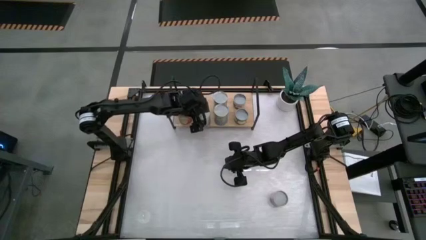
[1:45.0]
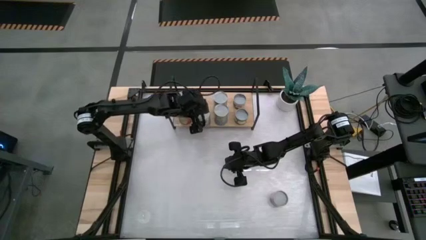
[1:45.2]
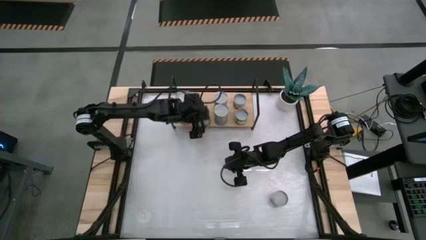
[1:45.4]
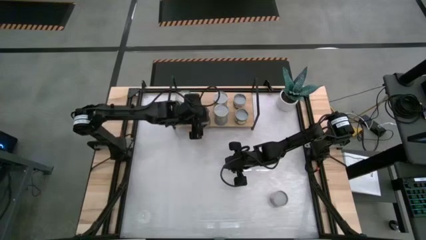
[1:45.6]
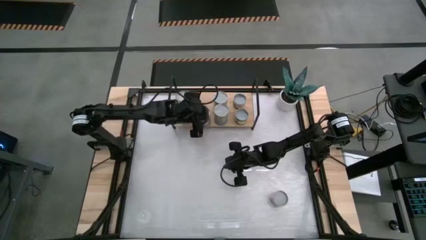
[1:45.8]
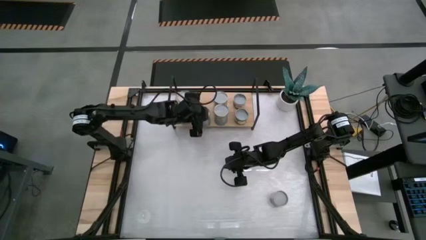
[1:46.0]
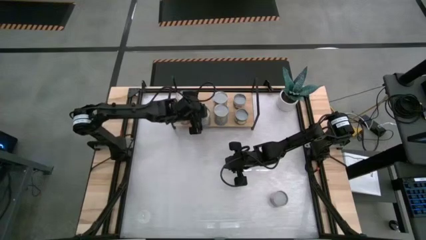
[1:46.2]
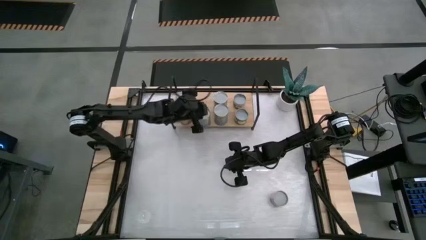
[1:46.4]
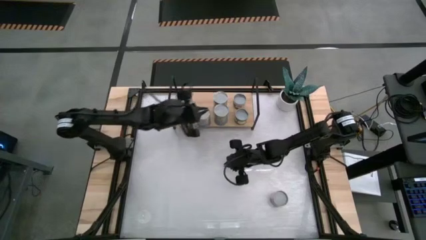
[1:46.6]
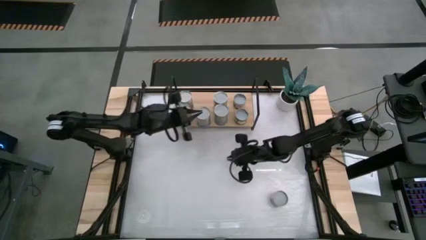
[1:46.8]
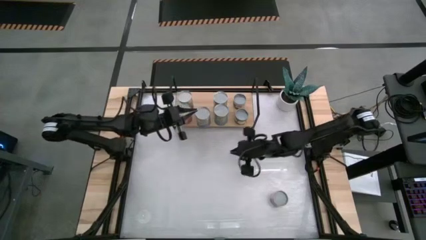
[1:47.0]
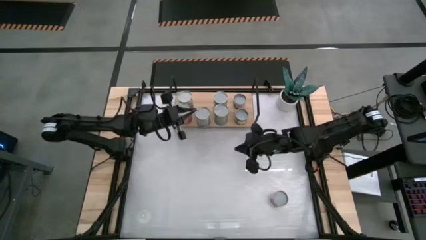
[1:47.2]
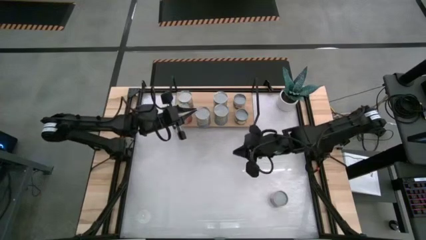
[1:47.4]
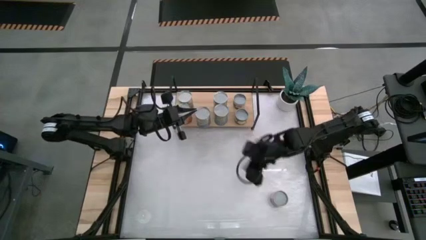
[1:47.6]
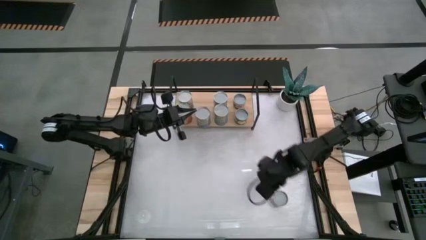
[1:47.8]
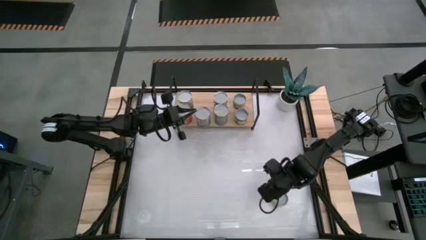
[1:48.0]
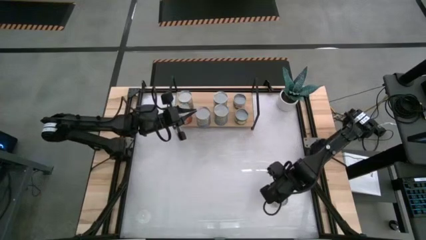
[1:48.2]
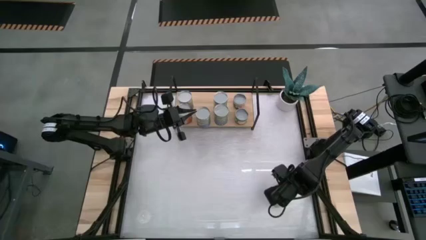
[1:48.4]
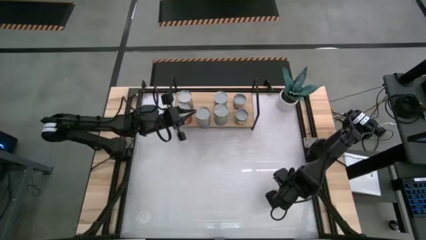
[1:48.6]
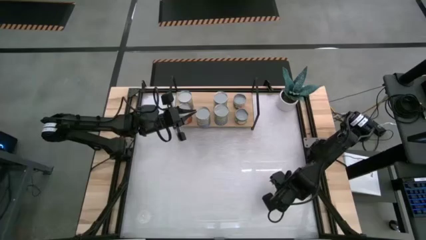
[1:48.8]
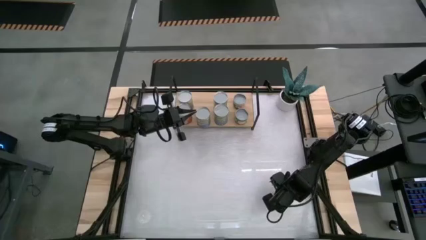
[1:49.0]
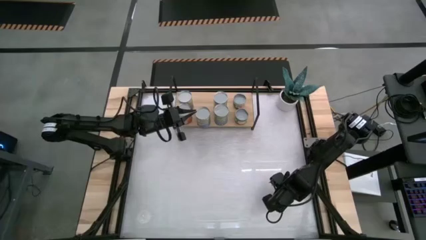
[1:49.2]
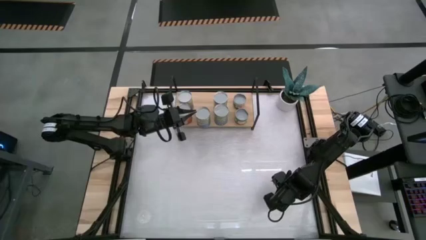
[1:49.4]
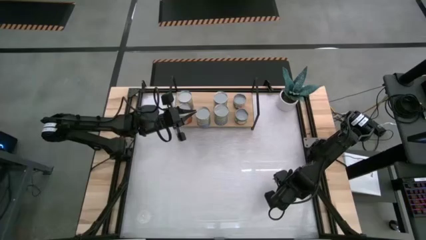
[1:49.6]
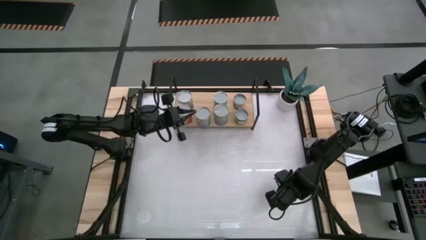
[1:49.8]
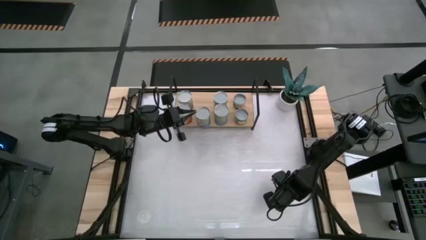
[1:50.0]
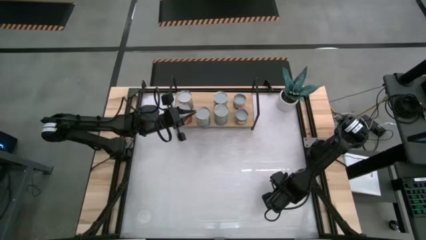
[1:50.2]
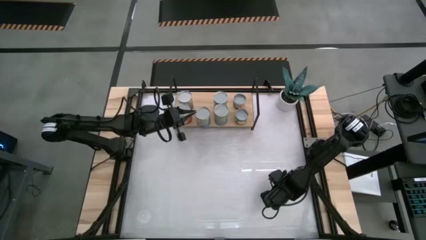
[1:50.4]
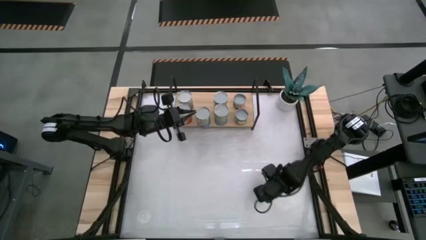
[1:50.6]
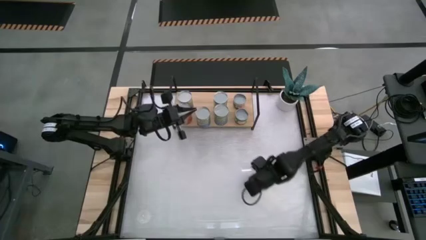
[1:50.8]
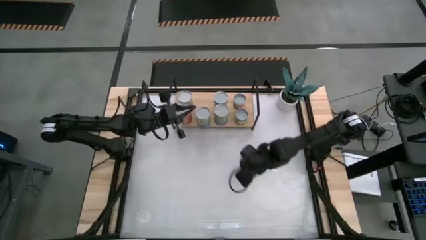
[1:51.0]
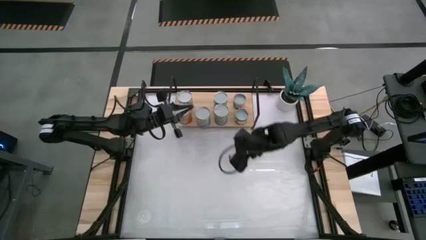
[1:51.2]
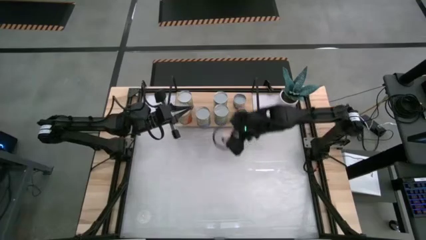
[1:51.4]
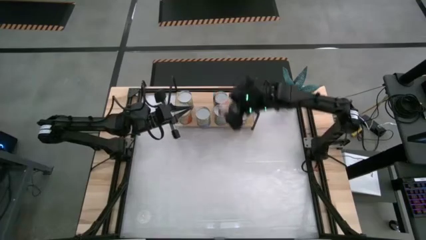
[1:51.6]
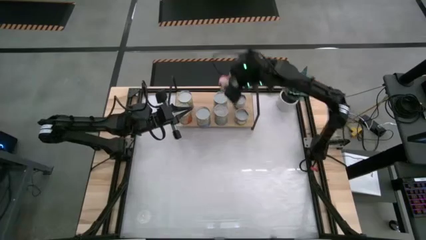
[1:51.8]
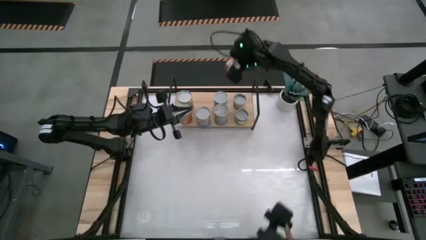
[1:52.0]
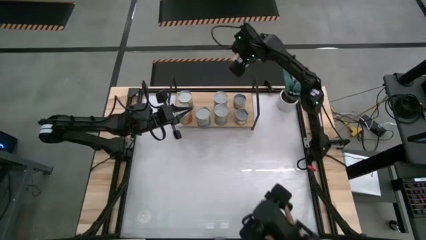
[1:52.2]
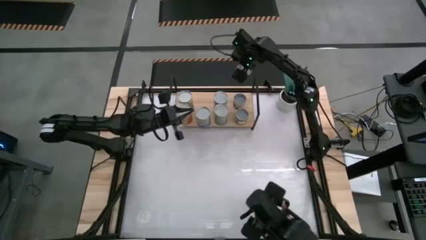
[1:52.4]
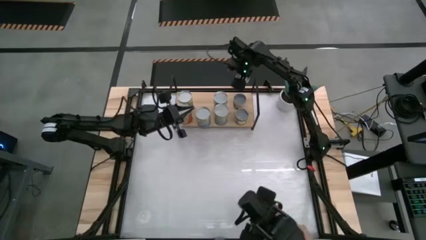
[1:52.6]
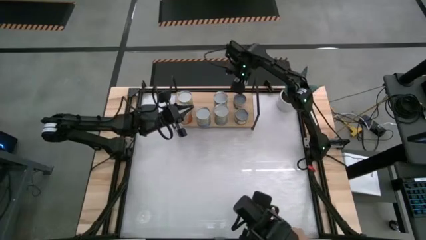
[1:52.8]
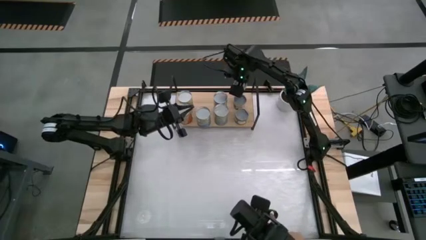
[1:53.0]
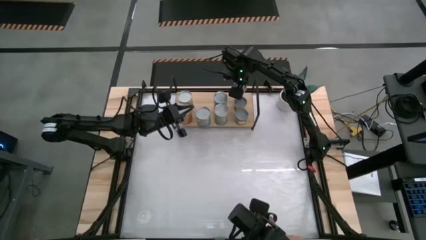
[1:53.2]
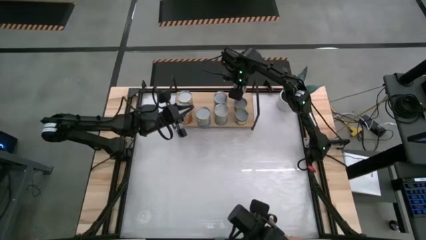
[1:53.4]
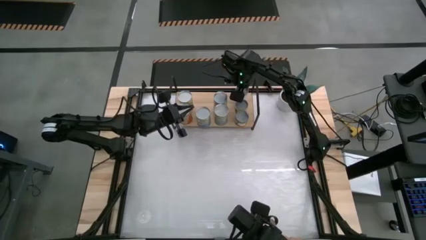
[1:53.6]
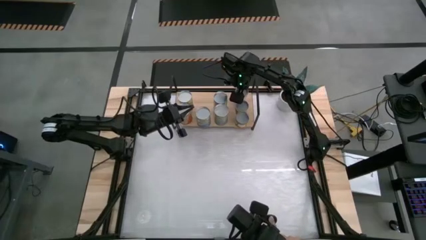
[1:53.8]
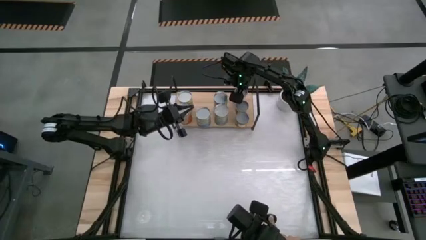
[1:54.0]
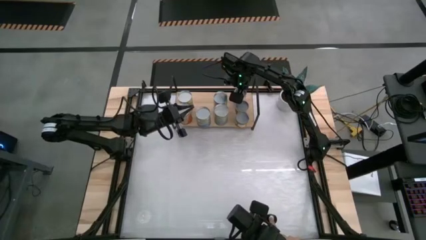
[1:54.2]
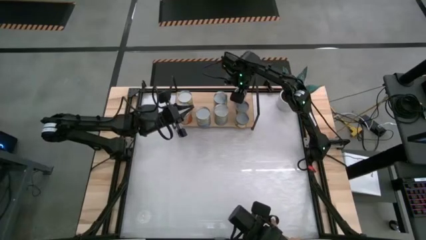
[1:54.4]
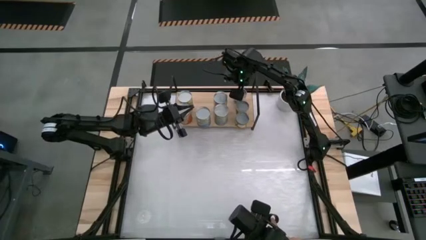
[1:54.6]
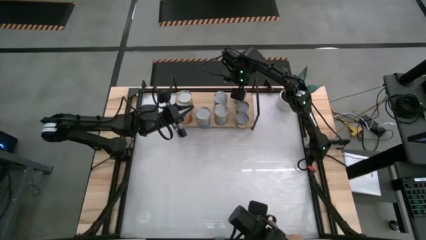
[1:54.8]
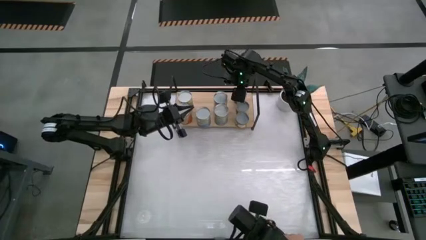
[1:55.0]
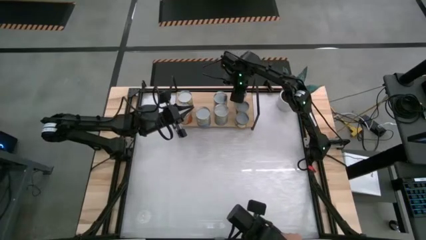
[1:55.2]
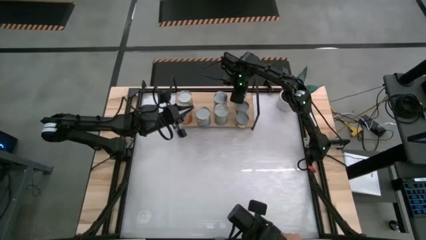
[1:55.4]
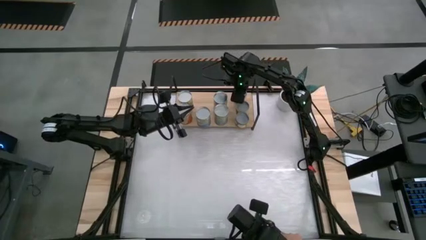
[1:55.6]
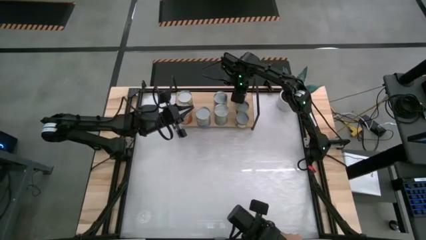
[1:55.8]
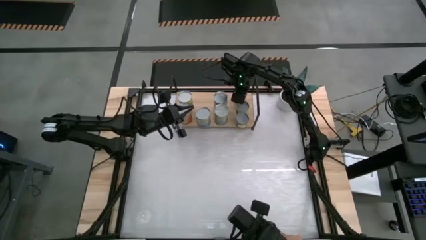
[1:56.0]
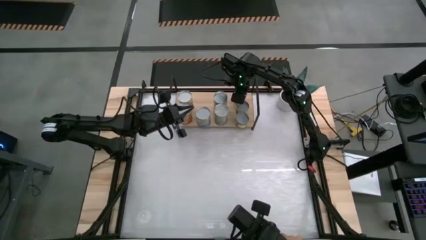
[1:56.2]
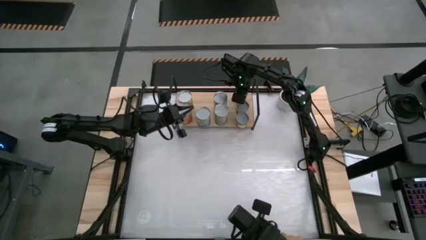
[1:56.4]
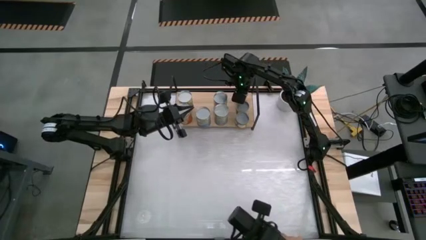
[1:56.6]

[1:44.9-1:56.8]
Task: Pick and place cans onto a shelf
Put the canned saucy meatballs on the shelf

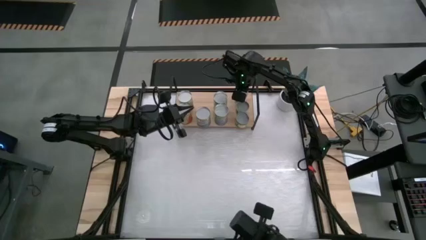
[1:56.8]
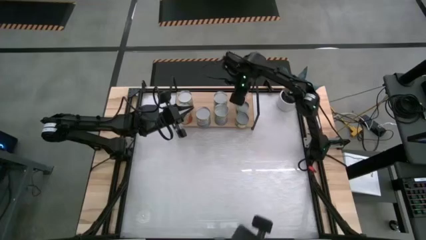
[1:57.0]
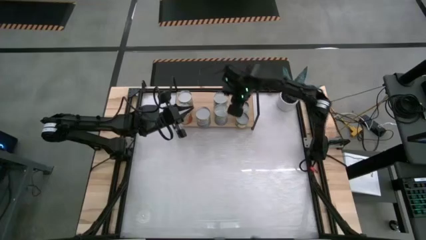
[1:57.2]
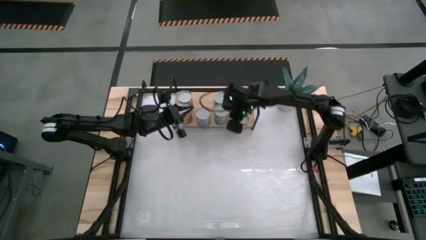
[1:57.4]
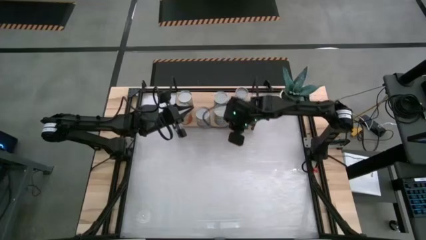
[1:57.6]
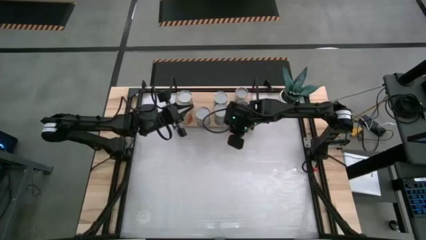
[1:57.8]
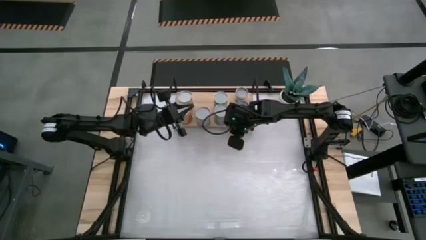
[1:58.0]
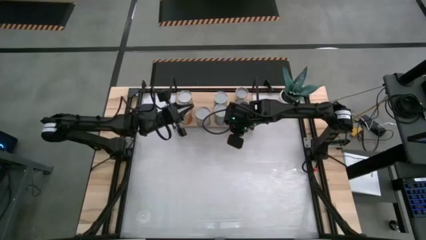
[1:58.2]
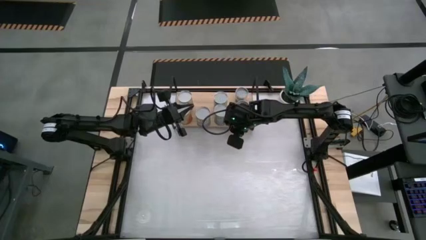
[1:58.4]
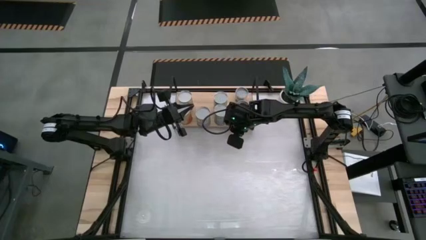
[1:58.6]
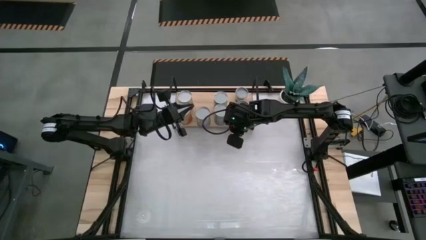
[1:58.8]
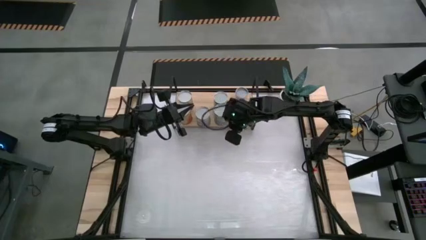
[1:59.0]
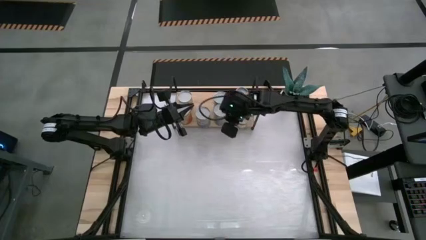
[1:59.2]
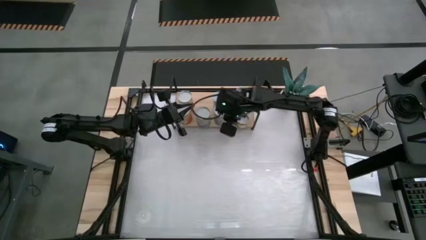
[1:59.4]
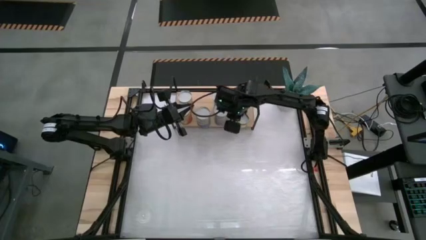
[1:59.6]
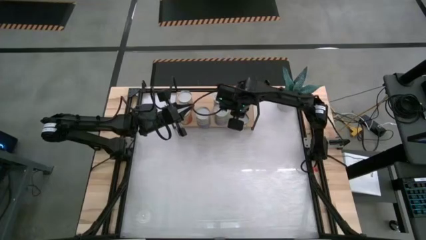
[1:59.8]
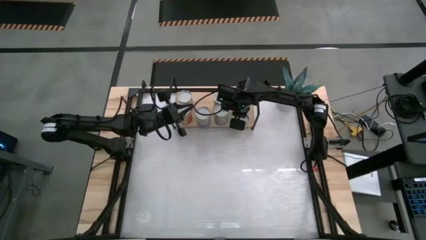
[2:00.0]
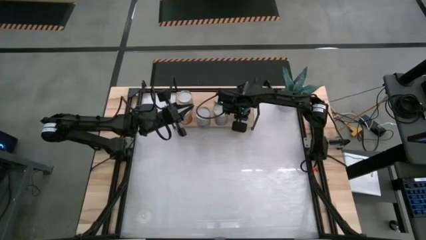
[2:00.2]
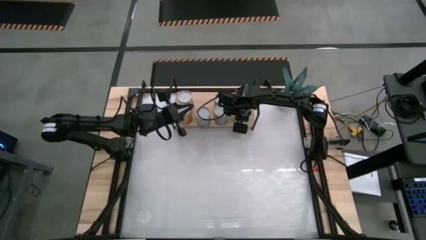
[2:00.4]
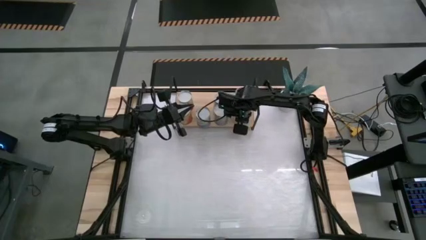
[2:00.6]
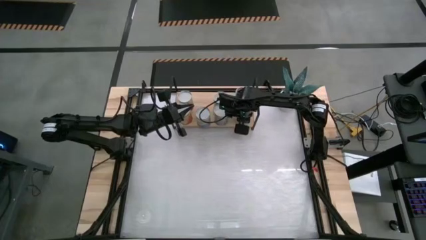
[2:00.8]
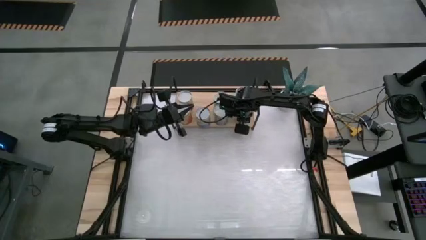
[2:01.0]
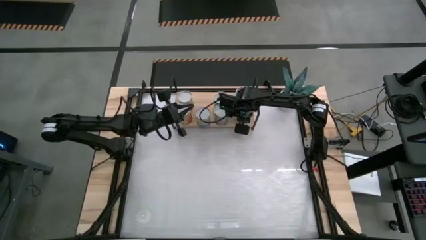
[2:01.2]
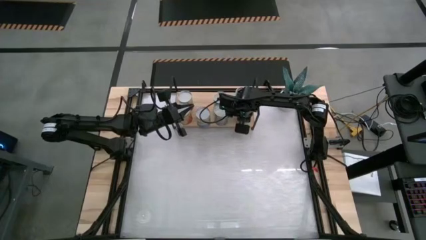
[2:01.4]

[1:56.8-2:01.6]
Adjust the cans on the shelf
